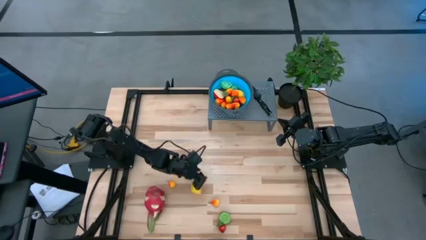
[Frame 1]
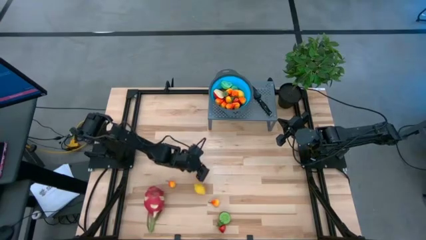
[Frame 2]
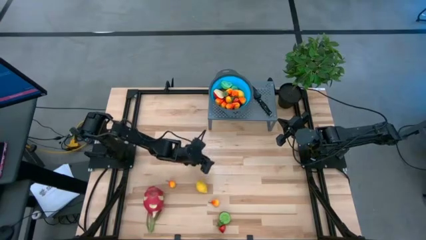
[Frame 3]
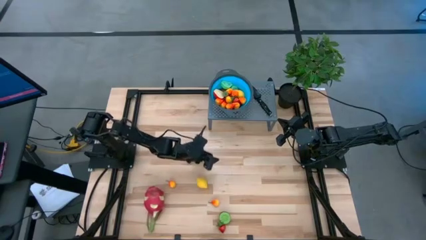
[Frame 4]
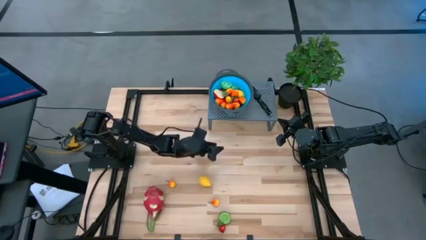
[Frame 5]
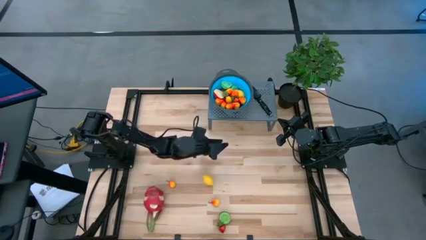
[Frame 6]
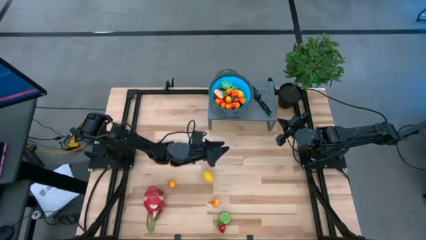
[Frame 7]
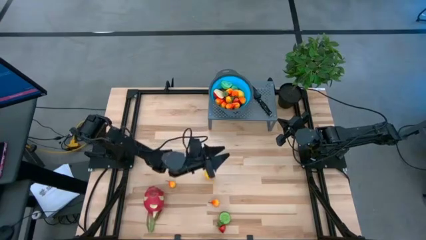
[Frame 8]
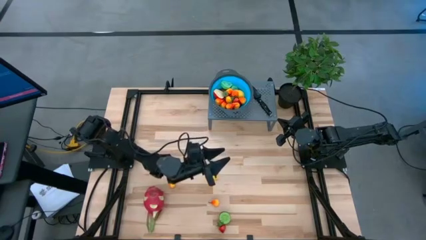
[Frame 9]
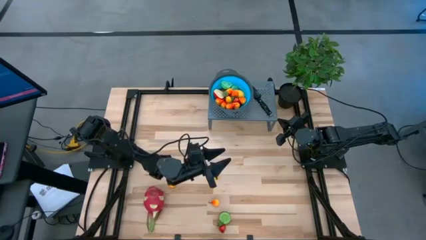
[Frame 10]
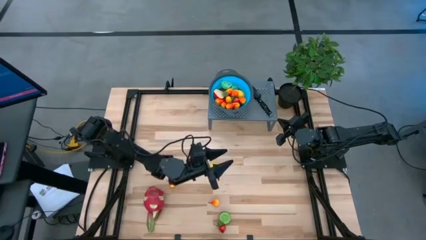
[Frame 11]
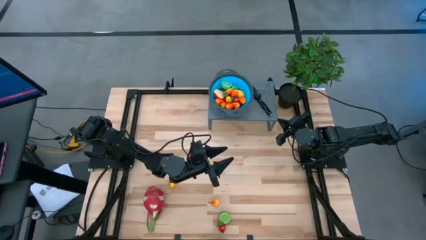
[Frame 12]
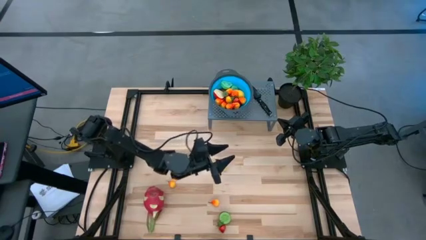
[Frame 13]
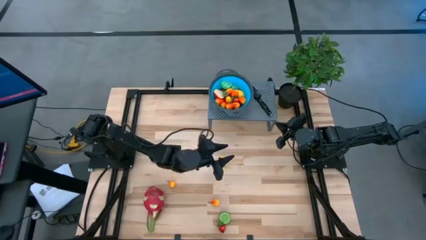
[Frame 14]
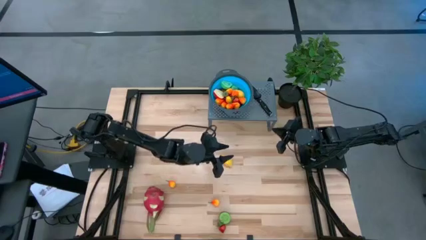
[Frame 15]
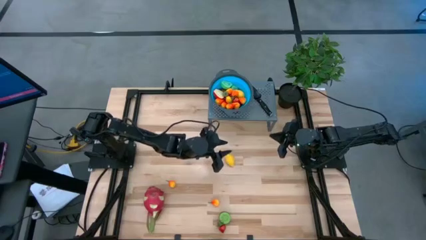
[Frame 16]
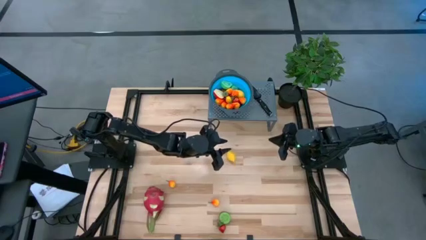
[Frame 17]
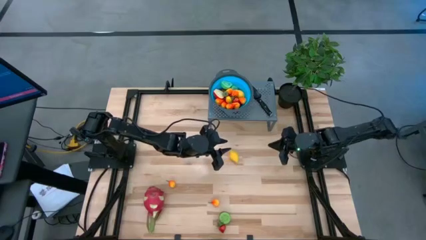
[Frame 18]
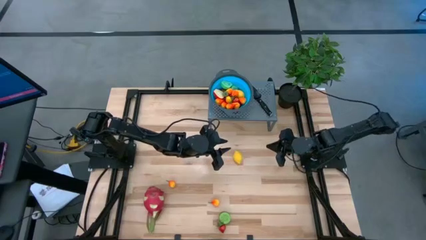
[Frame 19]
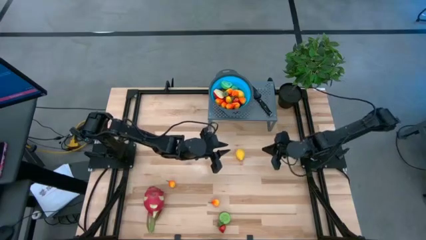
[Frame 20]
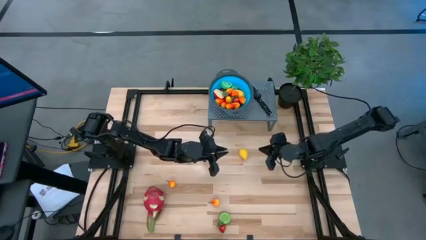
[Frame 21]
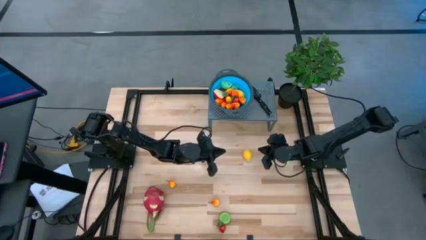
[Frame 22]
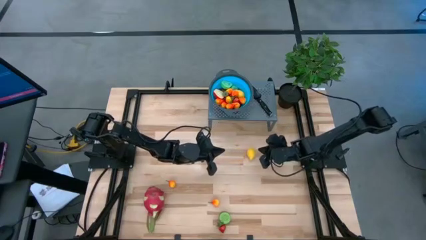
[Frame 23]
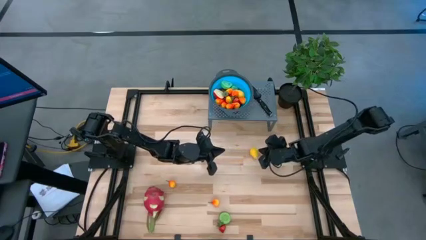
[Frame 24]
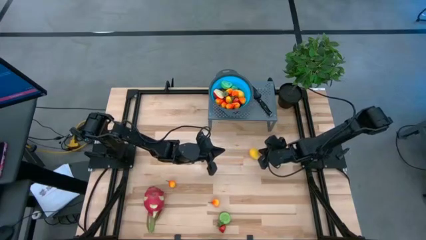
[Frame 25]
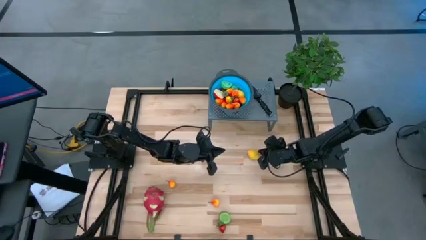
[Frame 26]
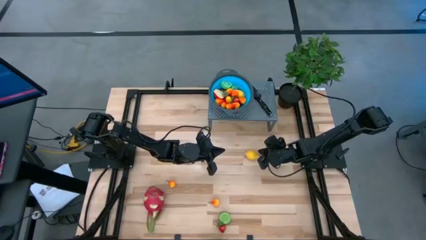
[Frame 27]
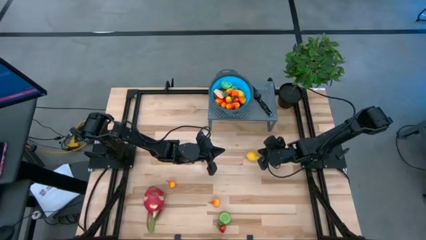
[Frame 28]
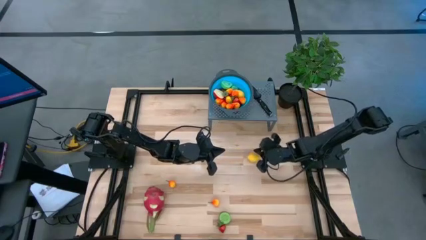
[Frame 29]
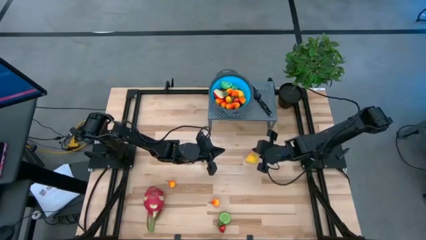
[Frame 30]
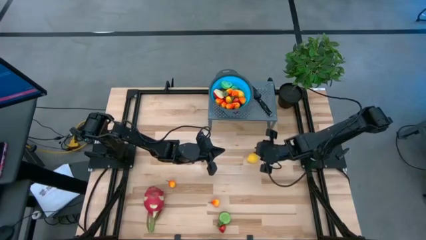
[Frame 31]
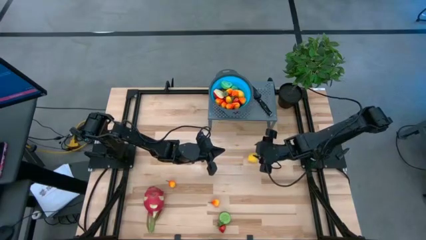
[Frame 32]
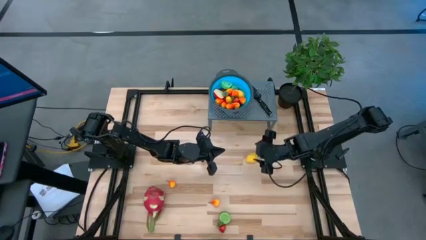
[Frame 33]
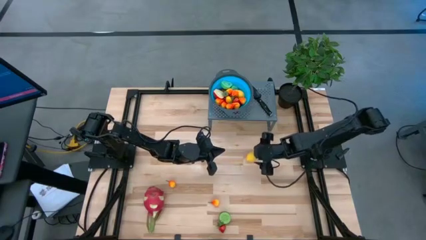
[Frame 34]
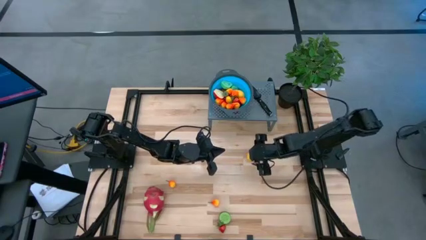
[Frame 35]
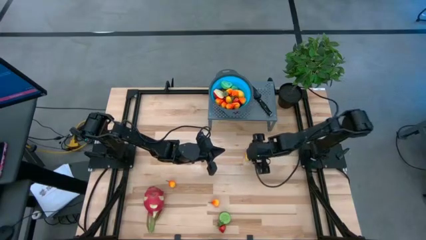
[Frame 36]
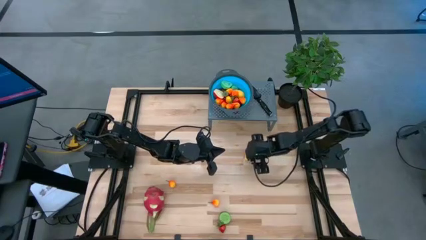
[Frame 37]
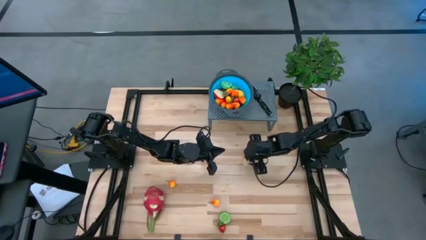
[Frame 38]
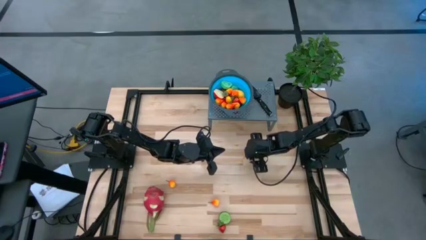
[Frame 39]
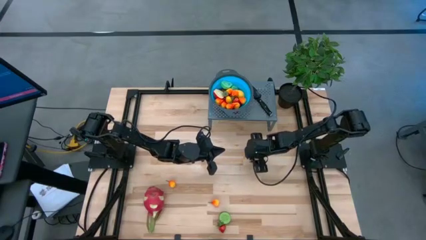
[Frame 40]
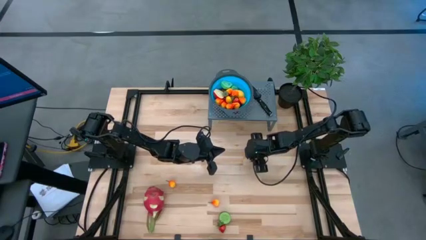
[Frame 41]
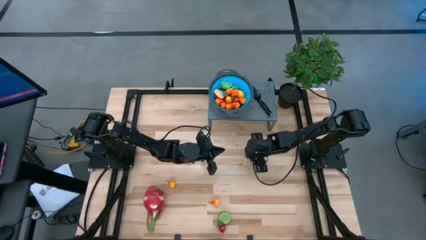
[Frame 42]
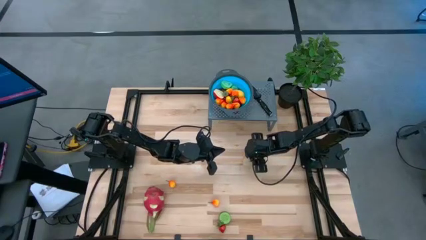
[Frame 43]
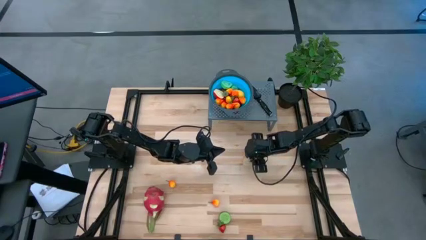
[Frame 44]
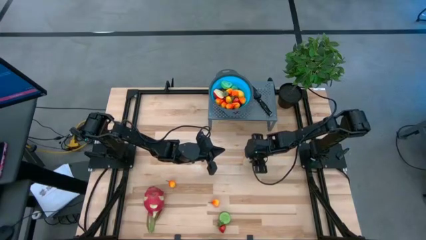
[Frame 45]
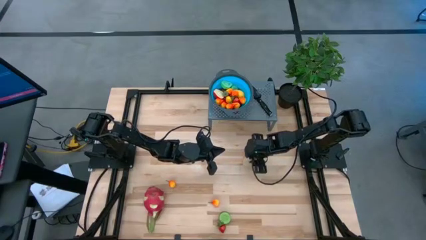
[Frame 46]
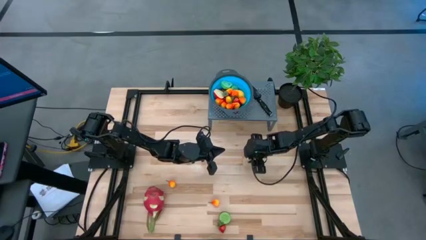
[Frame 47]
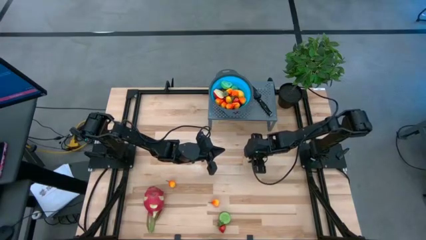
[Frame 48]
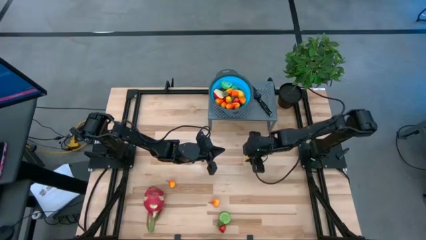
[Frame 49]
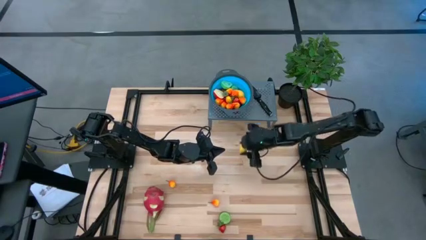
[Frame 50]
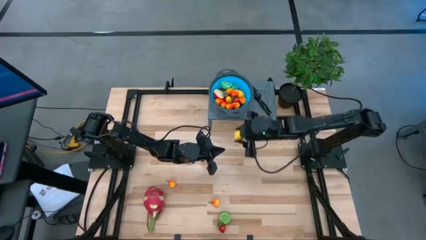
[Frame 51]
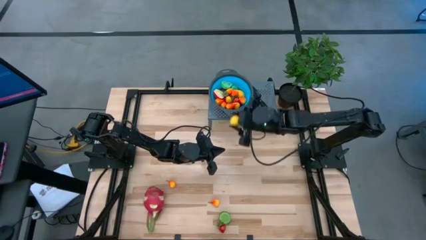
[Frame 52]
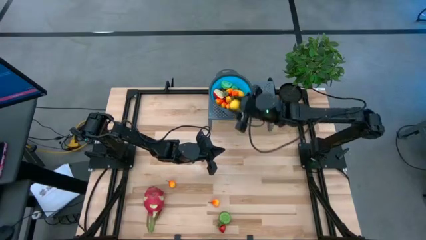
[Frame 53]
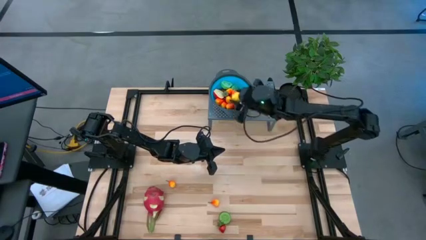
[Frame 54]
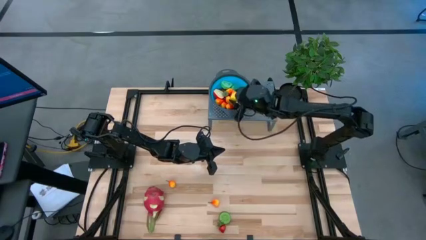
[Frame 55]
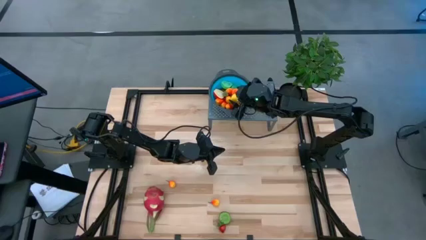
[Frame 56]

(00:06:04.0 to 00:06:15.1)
Task: Pick & Place Fruit
Put the lemon into the strainer bowl

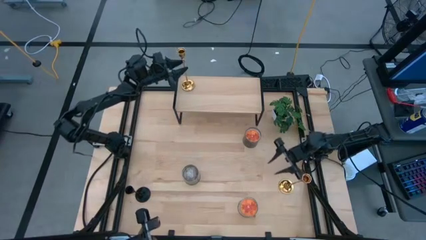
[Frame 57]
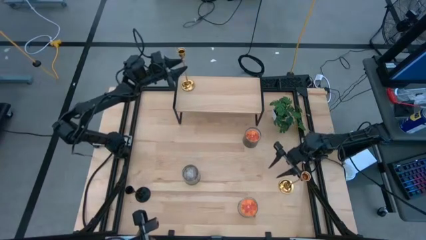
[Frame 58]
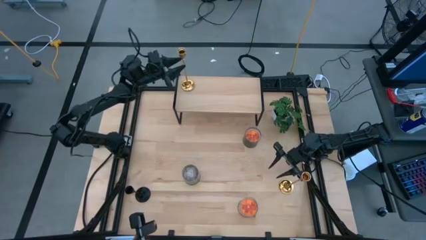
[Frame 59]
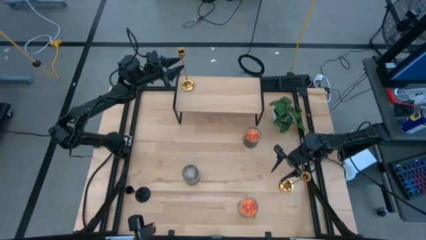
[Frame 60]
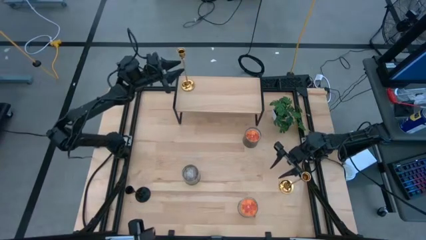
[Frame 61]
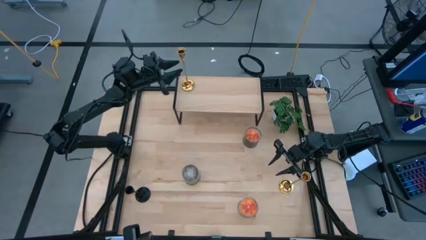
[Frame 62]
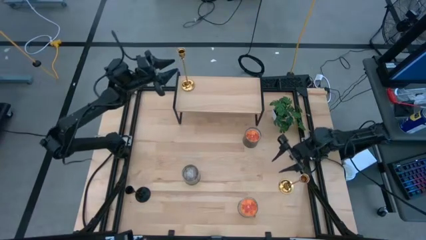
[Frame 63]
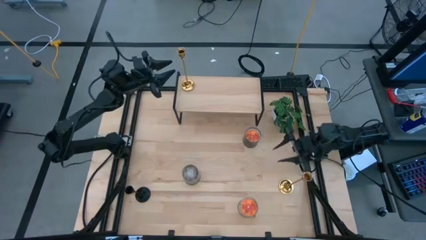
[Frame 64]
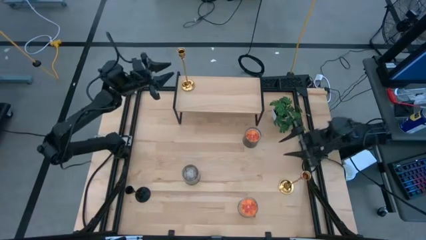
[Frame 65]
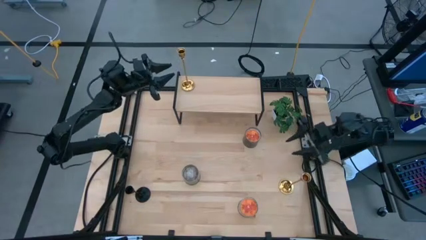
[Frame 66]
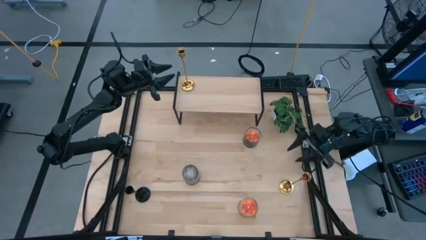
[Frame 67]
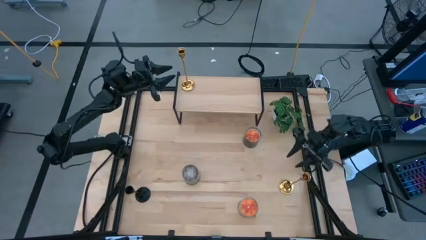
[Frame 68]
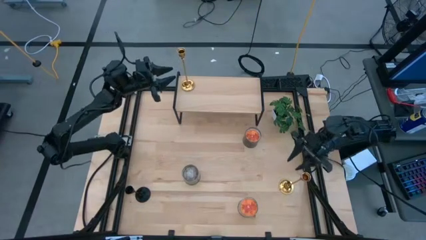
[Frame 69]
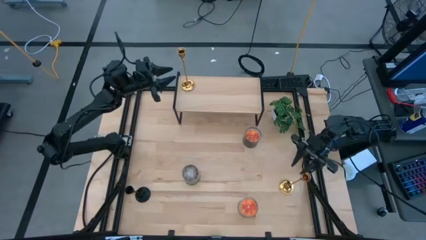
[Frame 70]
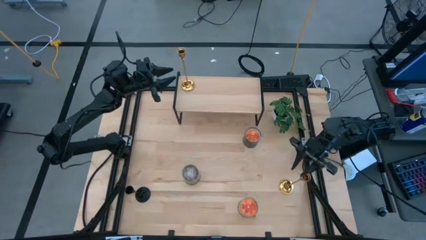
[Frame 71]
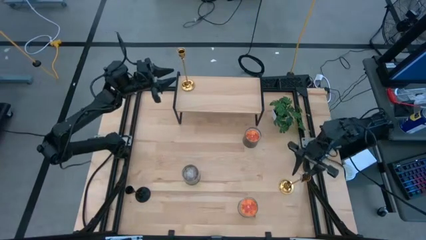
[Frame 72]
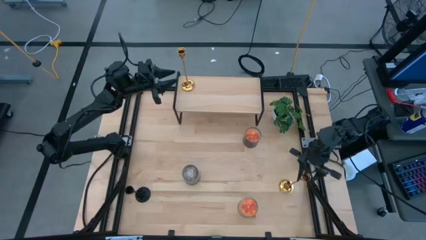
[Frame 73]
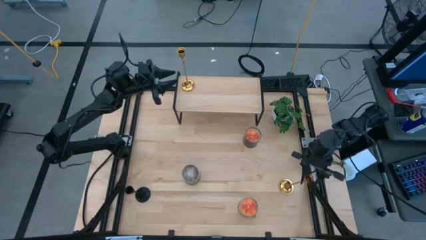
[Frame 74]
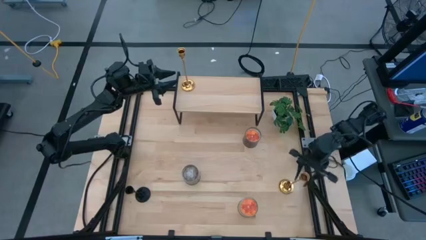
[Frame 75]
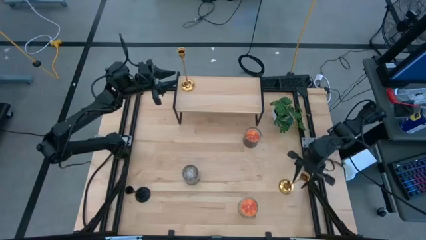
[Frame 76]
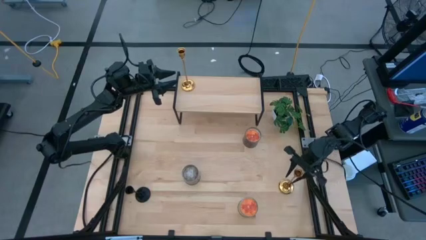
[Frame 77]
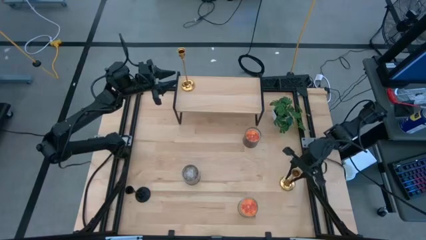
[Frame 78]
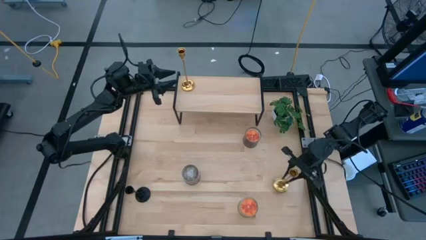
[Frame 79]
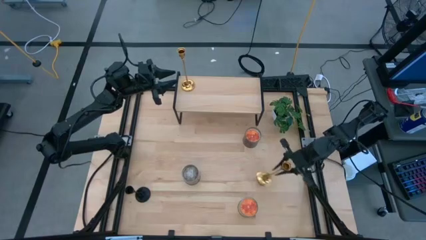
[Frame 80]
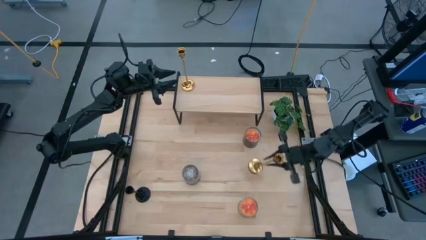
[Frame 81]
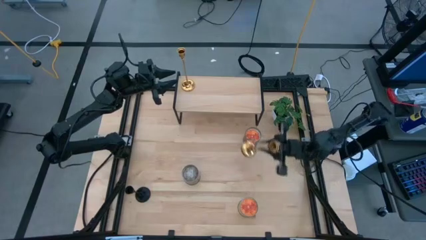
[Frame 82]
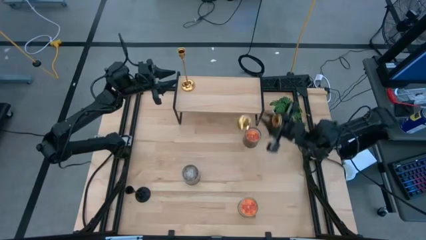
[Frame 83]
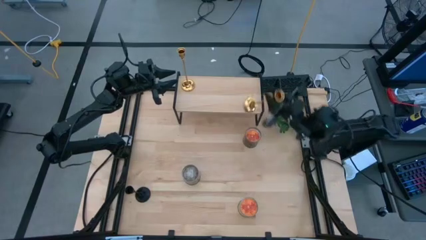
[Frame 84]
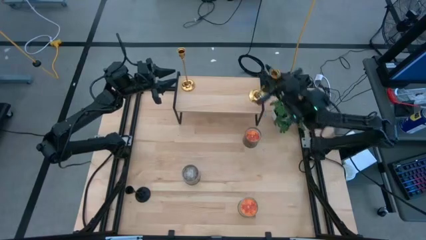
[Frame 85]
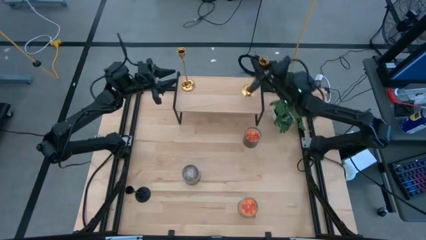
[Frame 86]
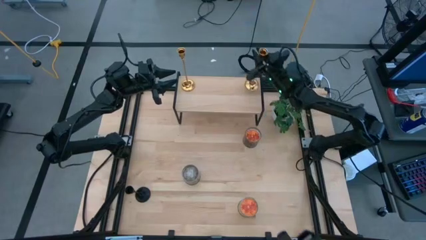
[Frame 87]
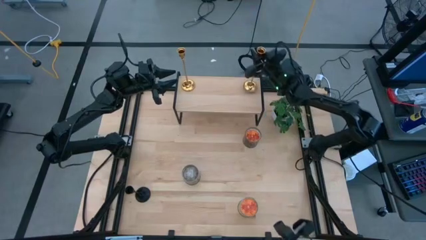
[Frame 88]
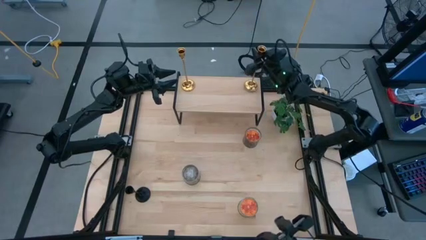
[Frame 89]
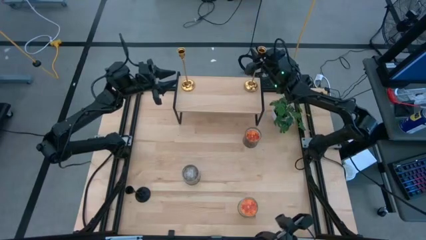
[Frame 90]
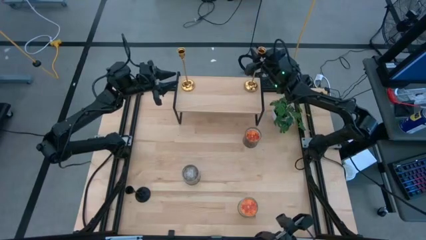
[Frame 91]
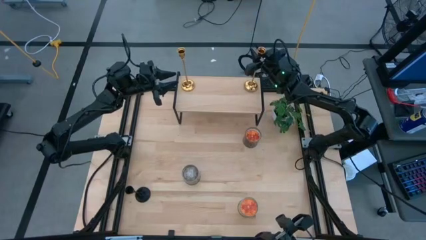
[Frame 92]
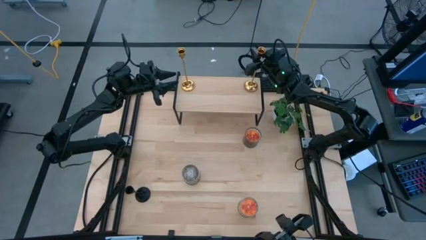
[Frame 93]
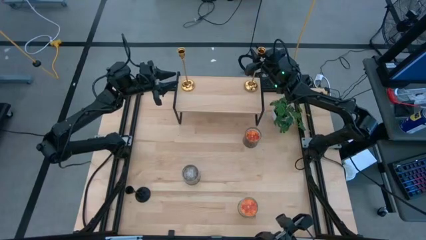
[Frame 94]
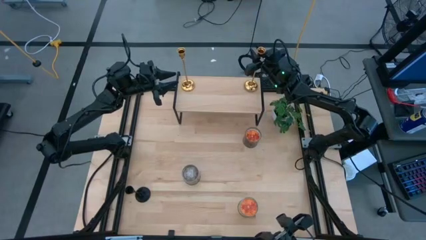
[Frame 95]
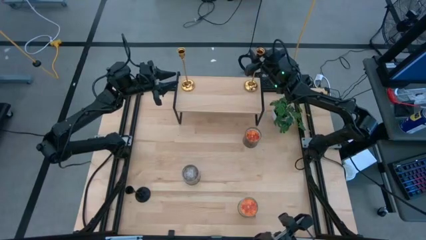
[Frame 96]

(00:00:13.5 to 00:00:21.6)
Task: Pick & Place candle stick holders
Put the gold candle holder on the shelf
